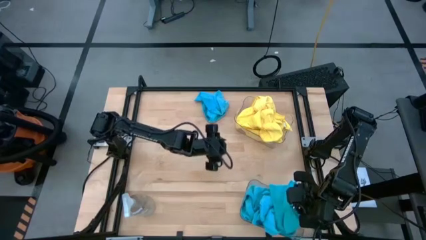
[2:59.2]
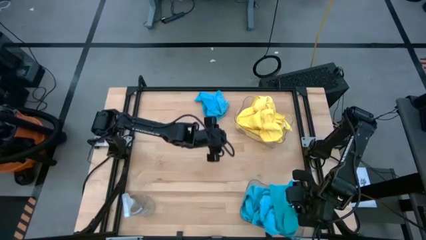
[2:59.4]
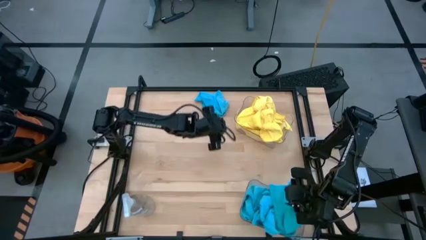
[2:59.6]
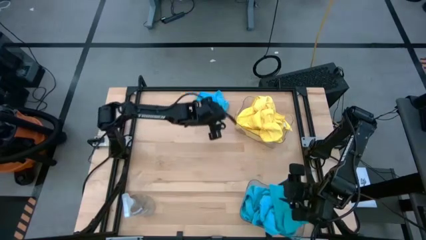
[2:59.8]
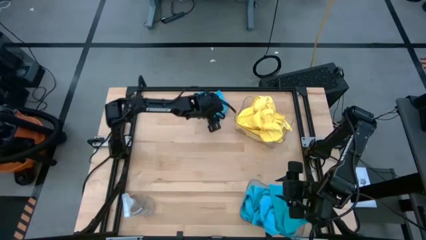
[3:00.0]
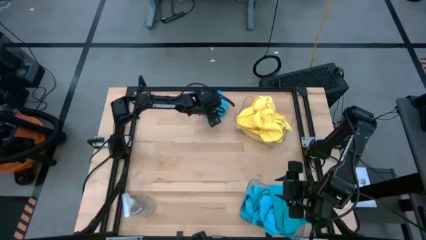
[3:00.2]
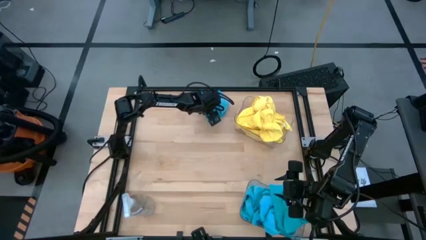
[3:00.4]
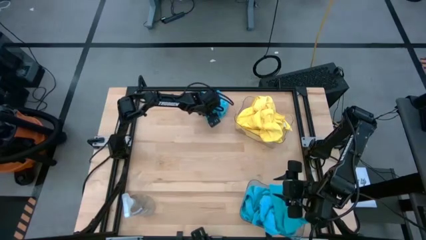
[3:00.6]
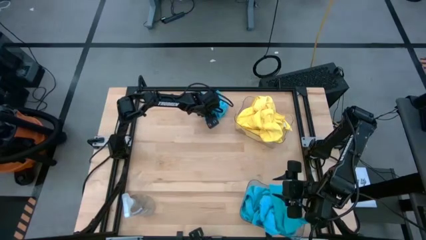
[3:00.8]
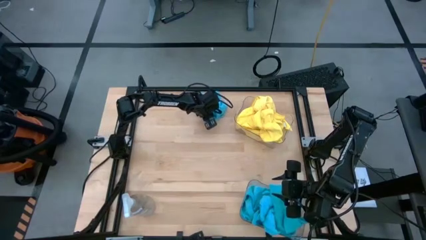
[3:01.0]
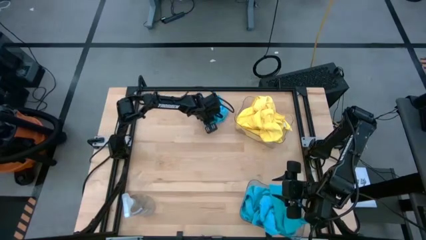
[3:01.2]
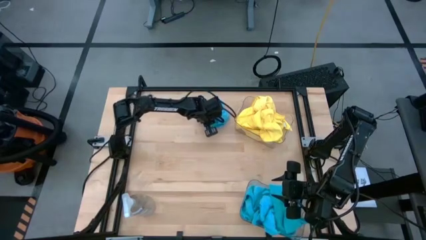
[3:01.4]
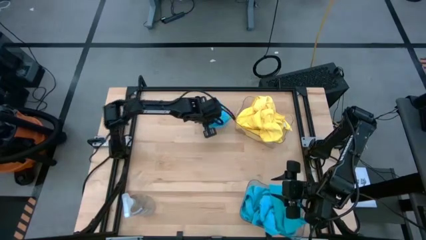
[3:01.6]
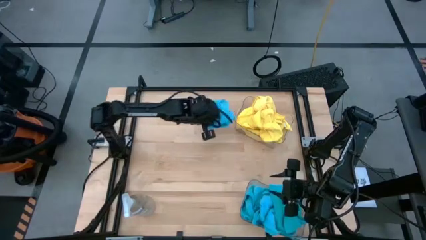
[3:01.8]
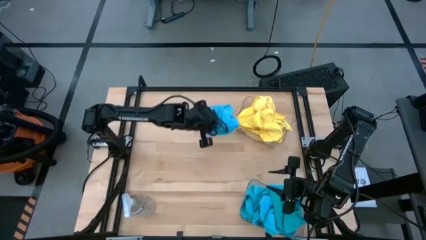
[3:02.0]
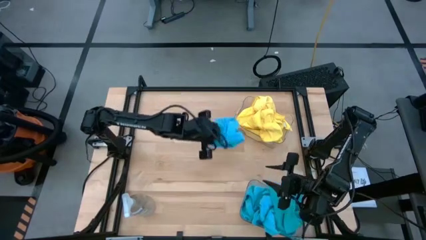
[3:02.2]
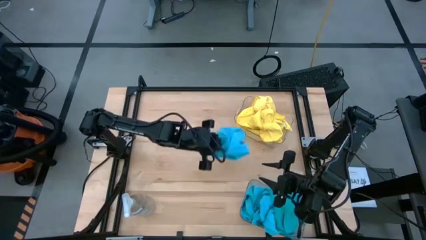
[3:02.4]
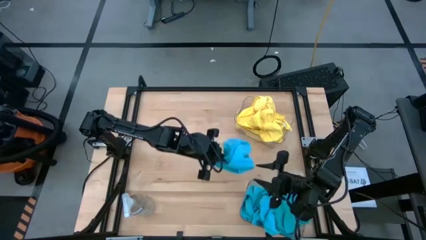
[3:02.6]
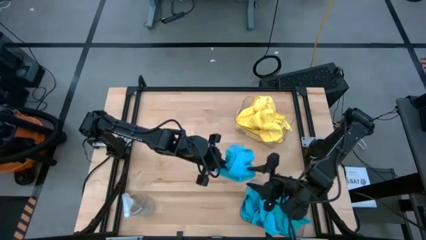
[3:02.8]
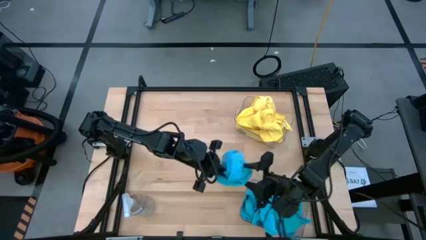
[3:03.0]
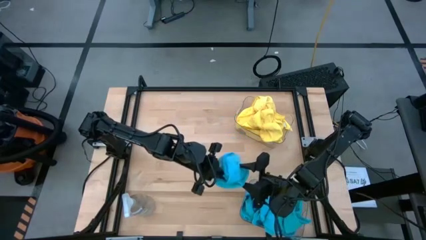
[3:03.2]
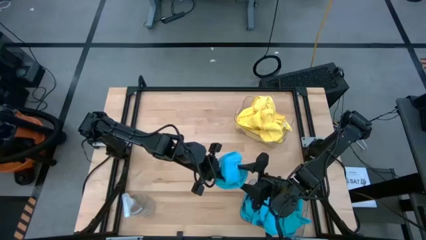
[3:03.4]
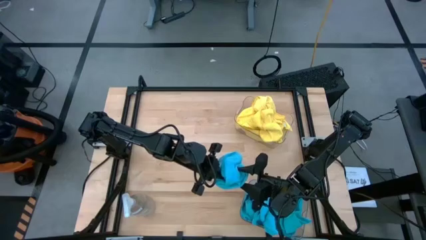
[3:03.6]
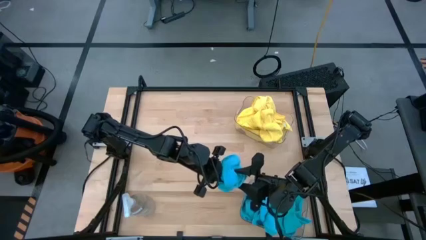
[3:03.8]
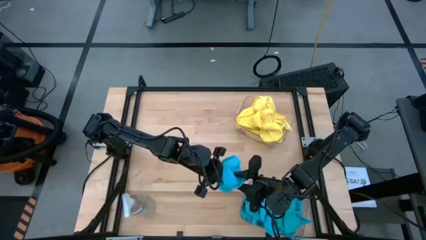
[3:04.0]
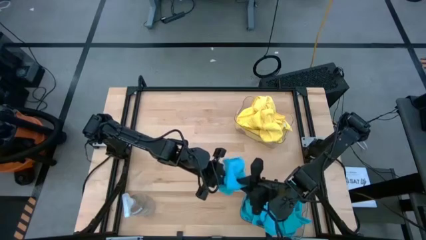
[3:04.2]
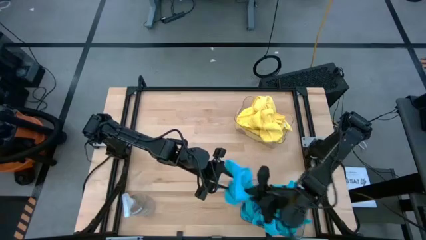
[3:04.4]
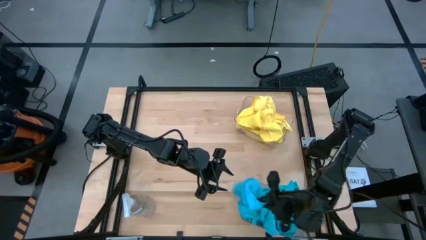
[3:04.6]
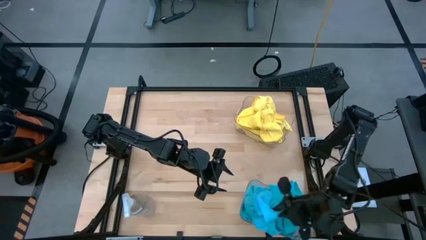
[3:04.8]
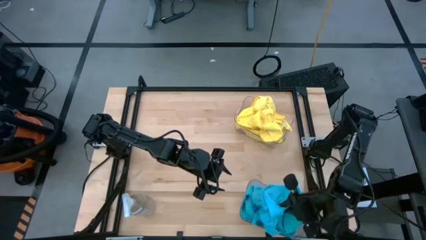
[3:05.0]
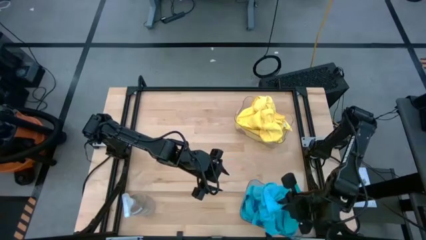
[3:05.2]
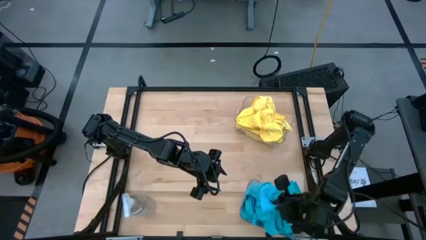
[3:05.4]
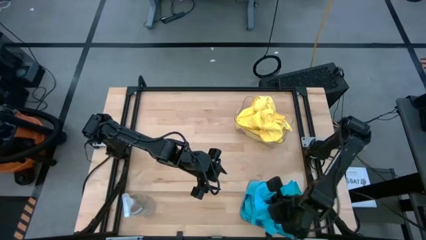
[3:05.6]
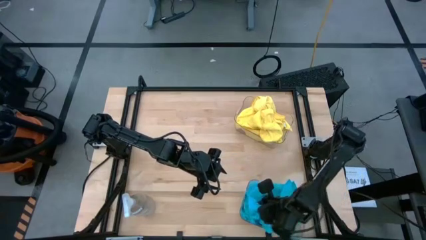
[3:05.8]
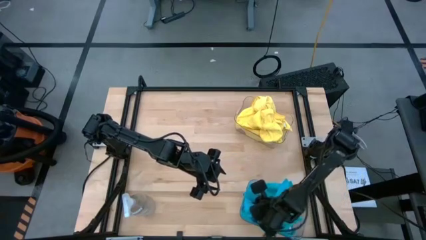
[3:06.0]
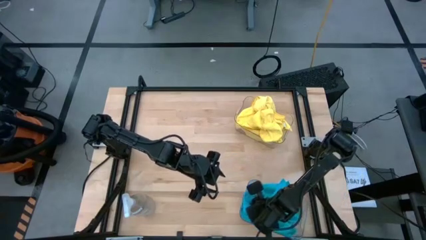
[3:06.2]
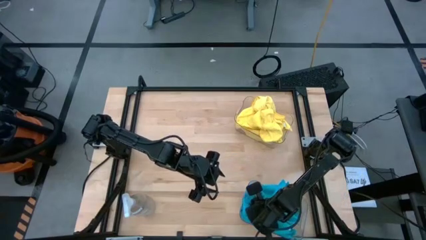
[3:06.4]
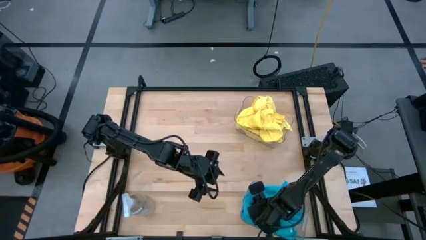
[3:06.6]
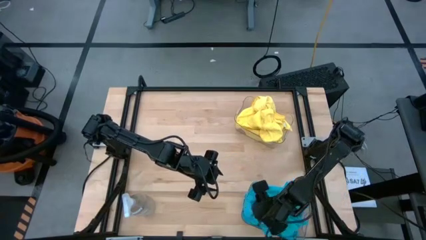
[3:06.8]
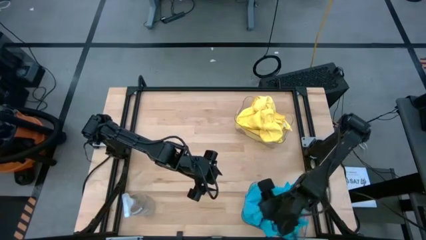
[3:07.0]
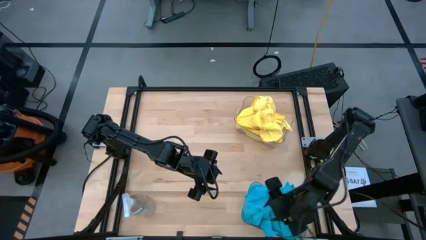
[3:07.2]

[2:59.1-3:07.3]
Task: Sort microfiber towel by color & place in baskets
Put the blue microfiber cloth into the bottom transparent bin

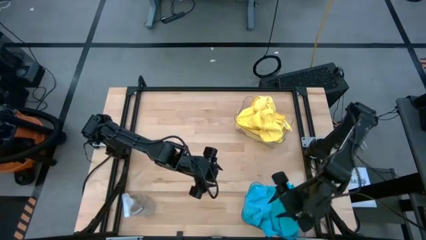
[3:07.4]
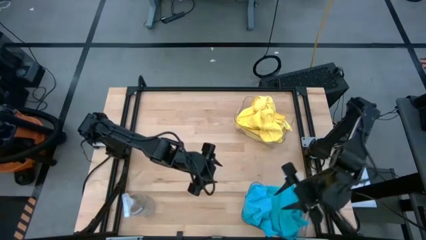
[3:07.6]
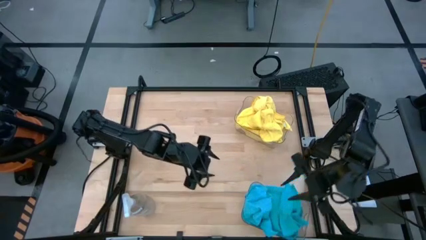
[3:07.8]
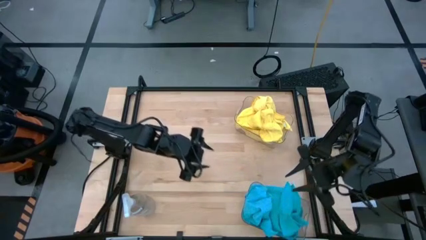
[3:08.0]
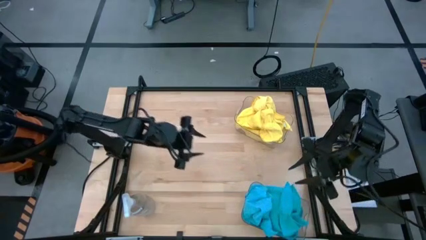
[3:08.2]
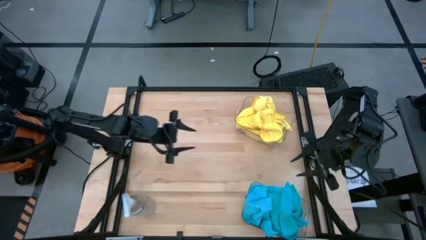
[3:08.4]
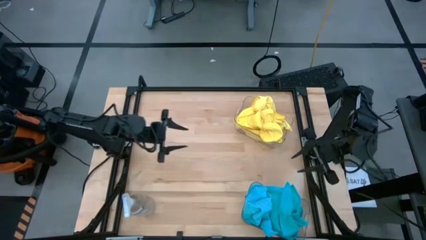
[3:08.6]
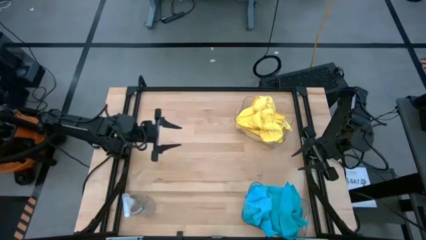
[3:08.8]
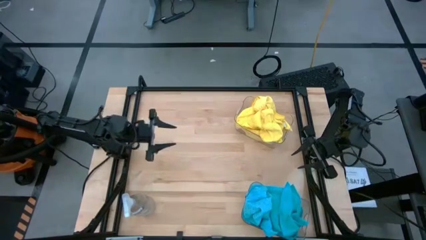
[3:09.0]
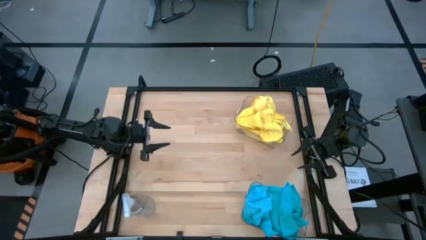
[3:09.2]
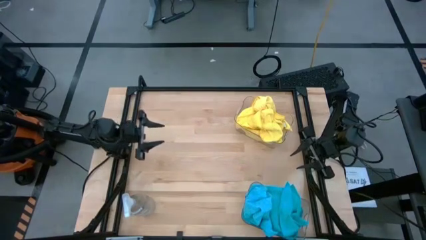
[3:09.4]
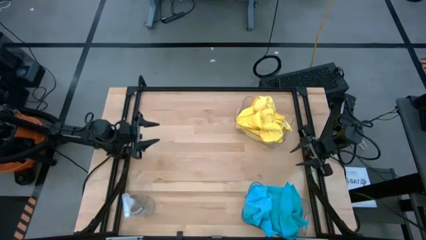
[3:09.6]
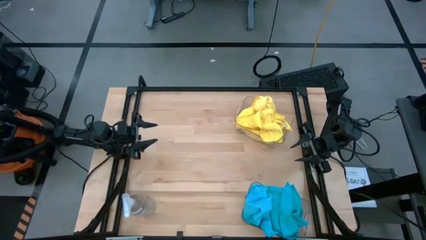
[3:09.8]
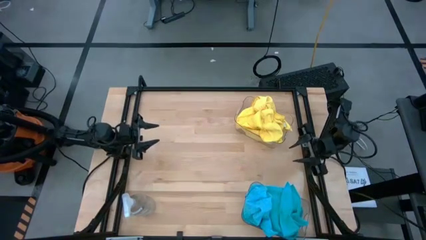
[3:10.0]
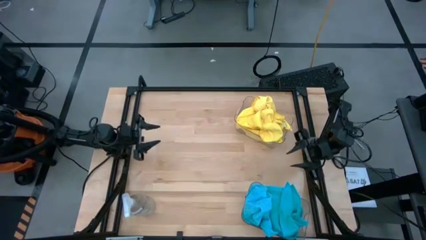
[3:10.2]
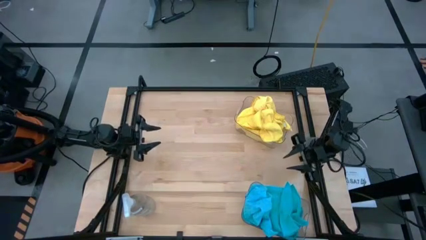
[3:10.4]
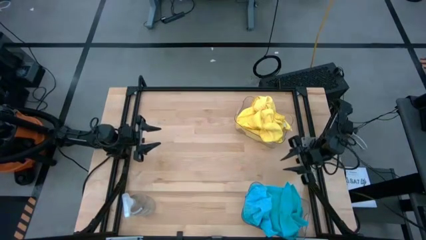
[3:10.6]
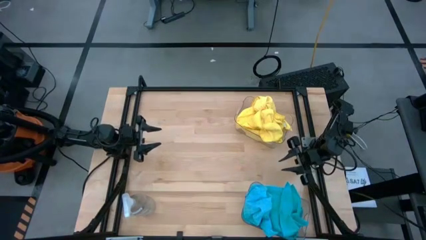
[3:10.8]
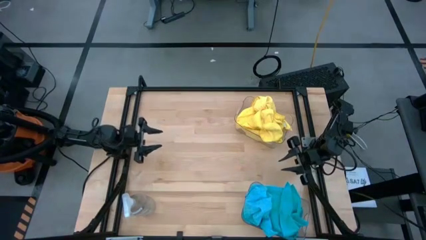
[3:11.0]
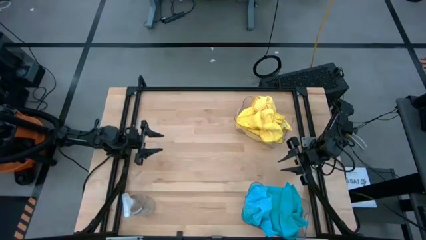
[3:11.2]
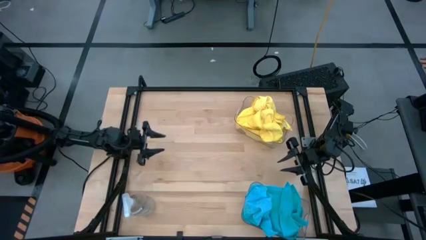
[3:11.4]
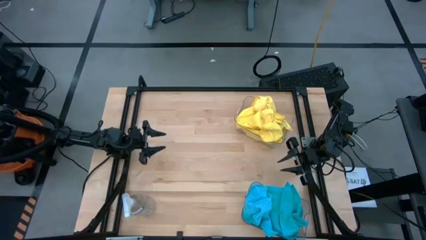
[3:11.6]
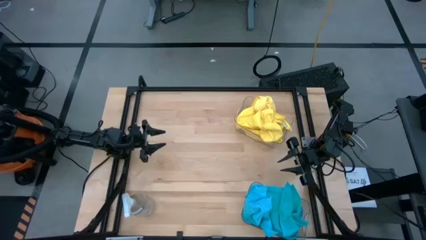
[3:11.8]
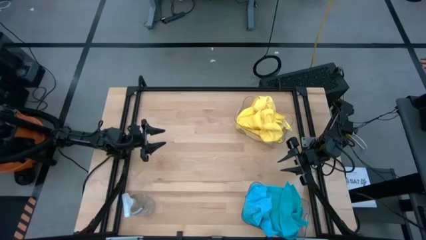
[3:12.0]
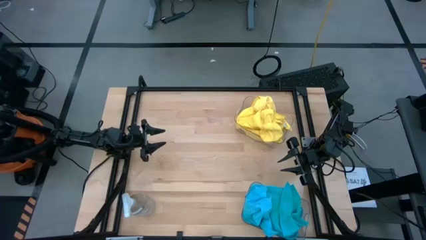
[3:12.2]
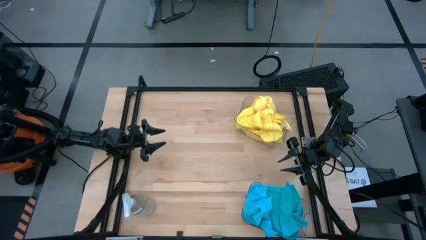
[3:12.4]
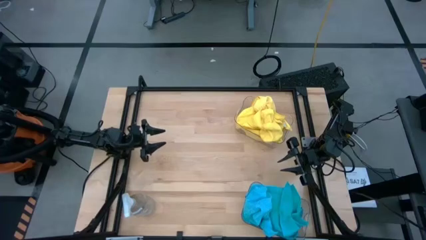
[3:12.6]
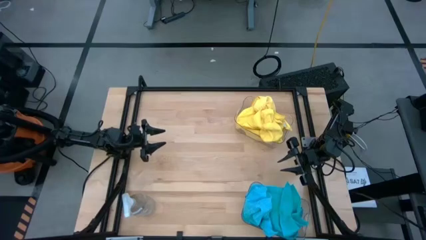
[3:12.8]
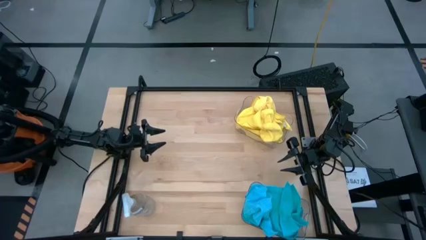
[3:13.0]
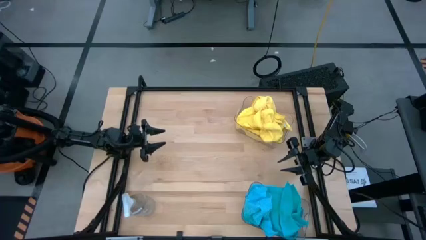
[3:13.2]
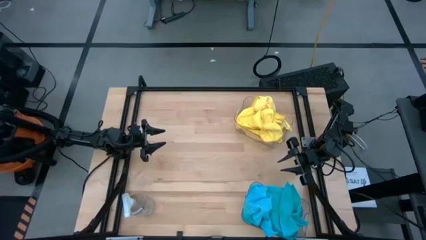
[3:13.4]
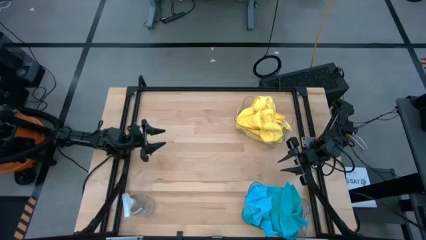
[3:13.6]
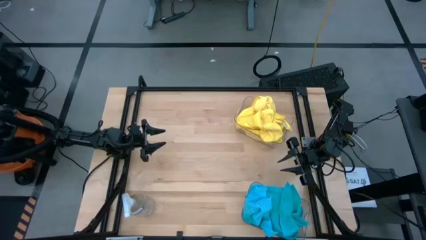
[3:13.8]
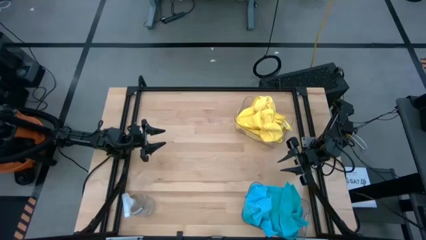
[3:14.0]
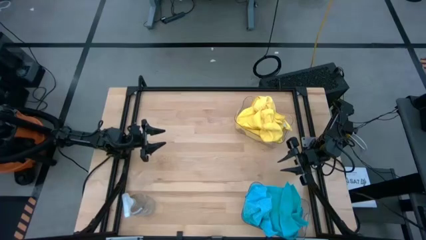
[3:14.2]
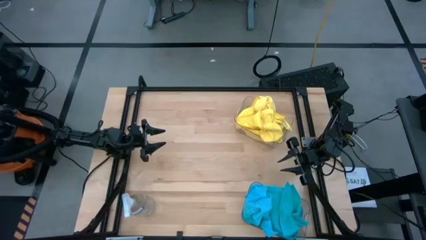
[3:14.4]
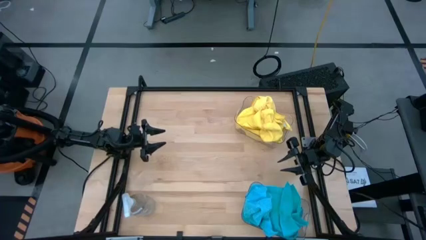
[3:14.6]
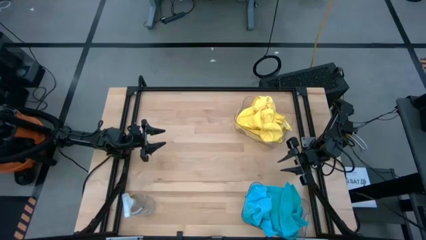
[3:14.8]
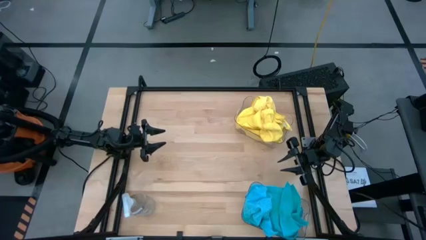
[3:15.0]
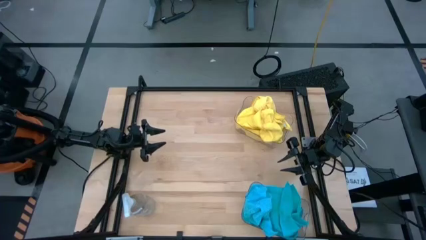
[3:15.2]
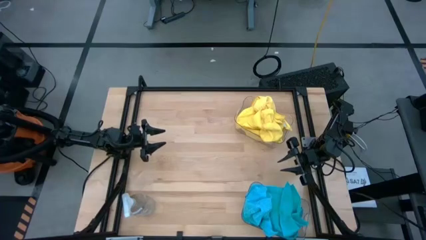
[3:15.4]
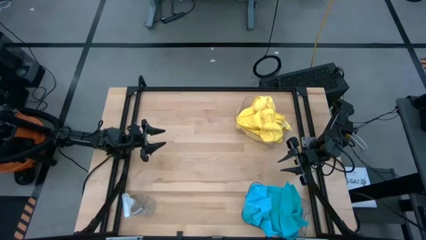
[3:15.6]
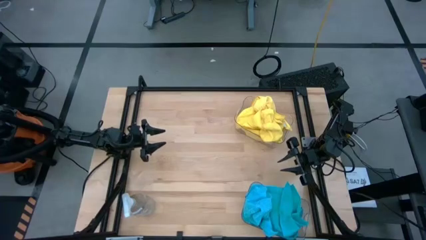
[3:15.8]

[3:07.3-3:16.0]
Return to Home Position
